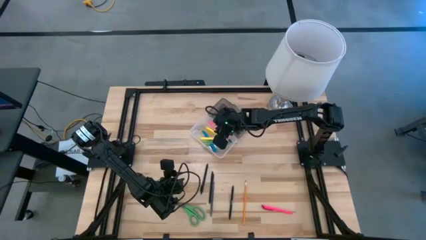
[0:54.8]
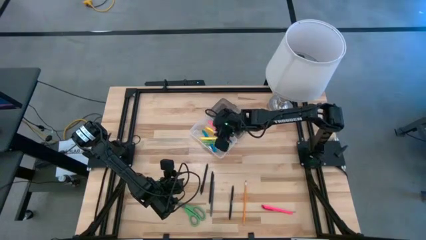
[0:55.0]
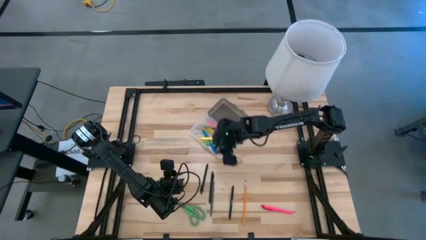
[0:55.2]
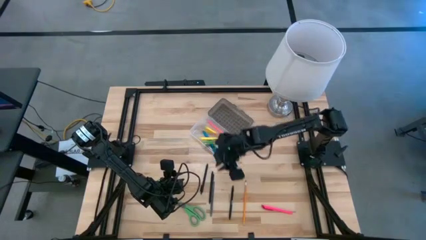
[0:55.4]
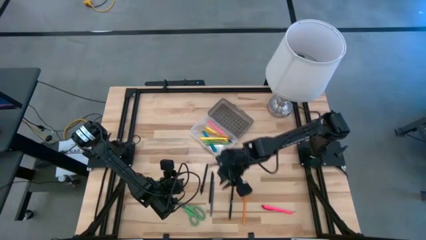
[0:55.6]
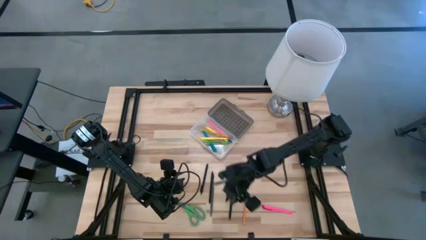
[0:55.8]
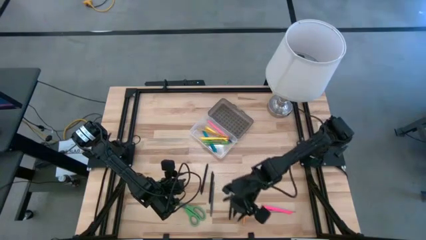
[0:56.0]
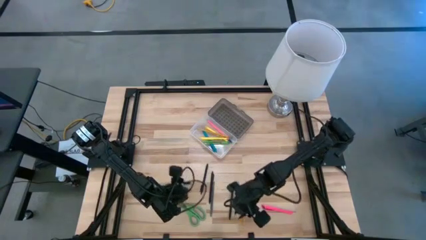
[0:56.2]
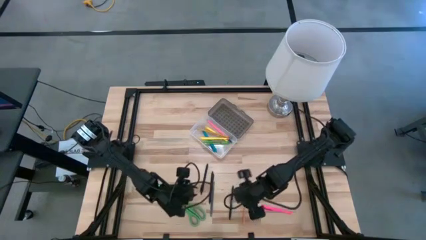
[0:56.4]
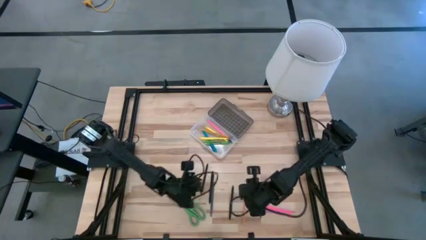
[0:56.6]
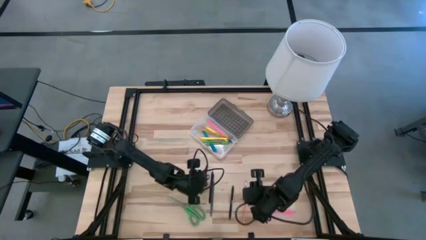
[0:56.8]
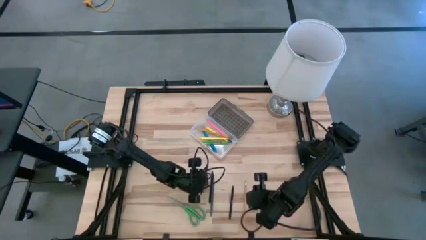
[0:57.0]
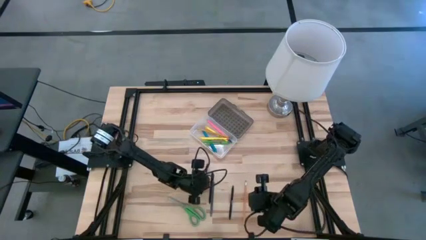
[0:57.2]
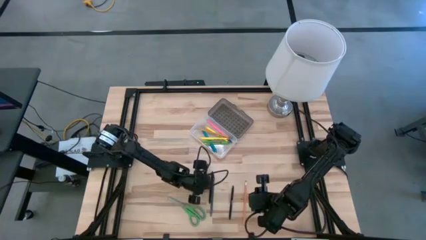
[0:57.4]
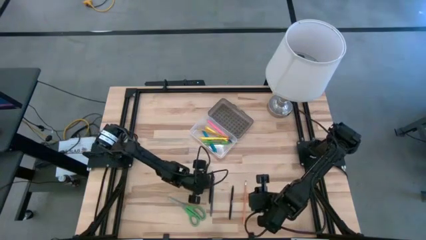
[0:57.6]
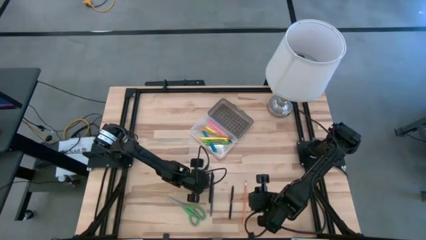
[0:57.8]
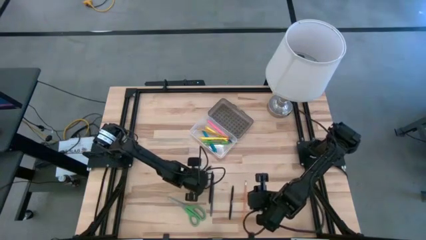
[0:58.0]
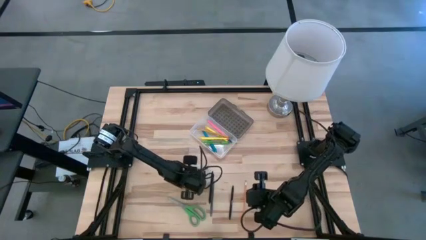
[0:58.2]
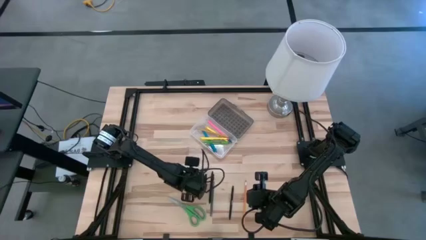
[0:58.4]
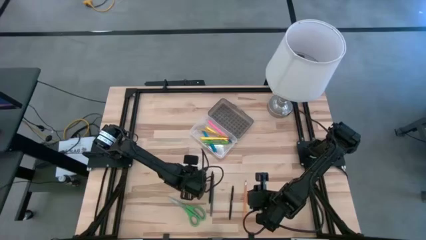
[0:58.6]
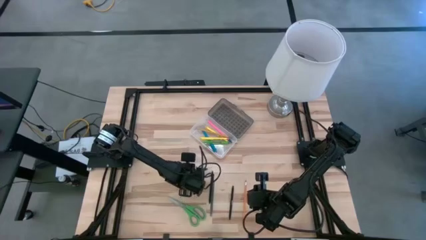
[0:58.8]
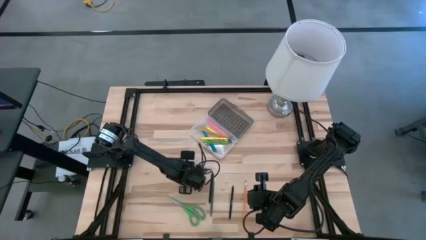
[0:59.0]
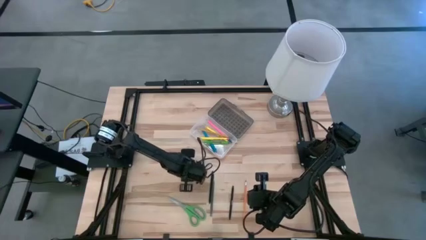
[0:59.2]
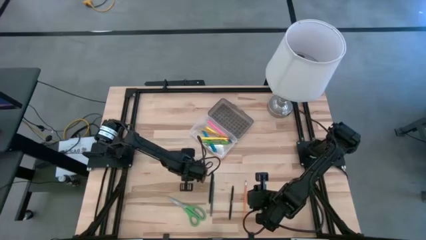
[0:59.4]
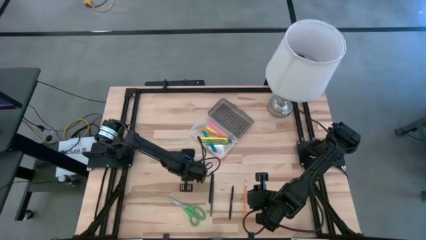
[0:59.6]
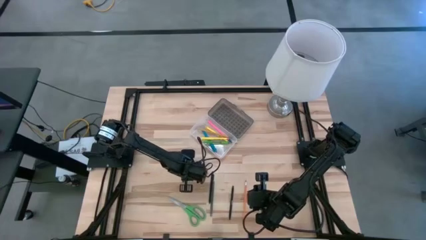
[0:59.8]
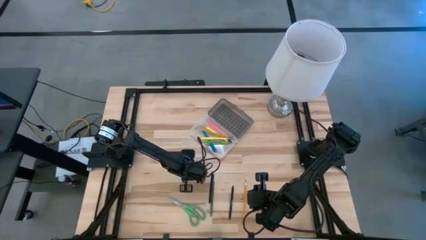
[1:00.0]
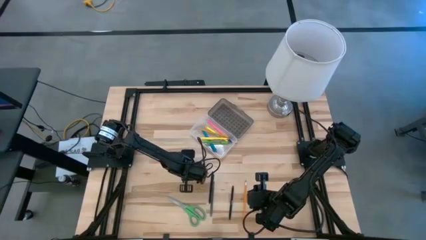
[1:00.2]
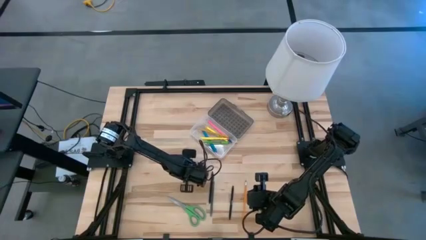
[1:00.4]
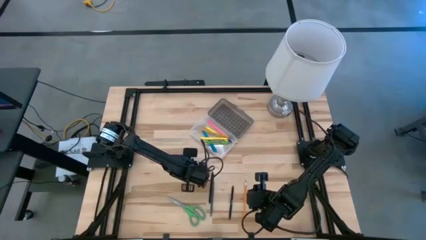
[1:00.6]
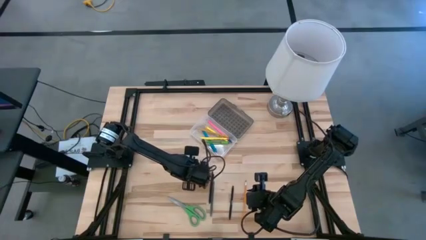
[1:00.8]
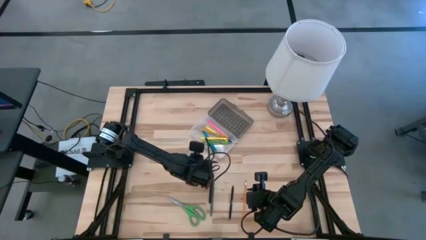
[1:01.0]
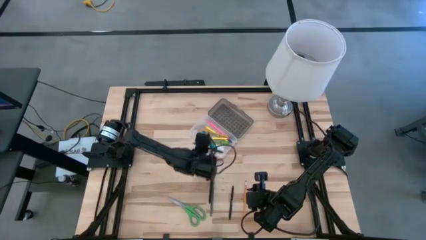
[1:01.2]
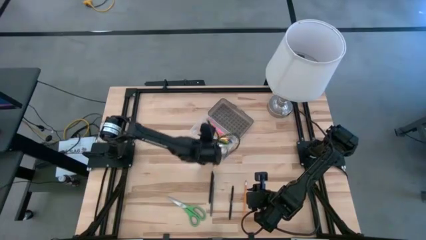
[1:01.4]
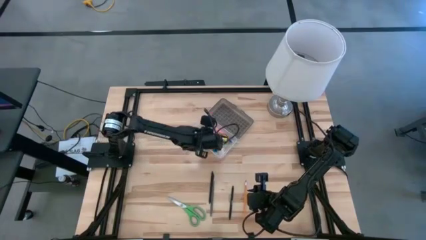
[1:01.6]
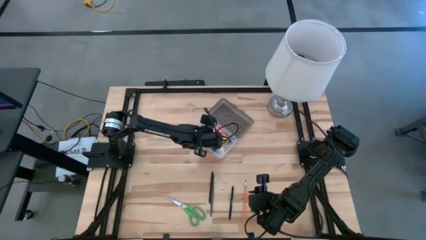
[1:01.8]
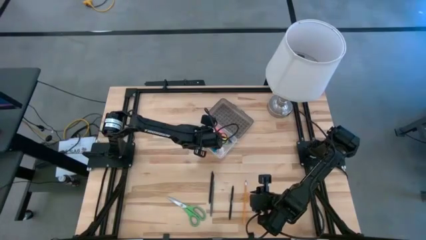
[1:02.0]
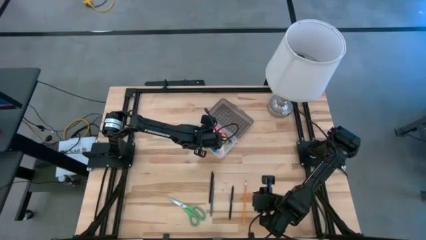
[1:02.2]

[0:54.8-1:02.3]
Task: Pick & place school supplies into a supply box
Put the top left black pen into the black supply box

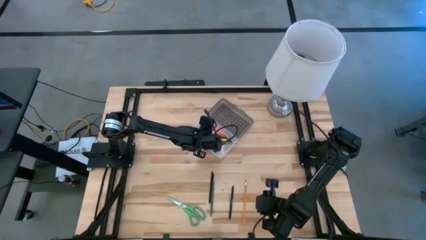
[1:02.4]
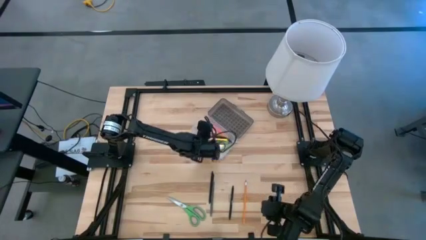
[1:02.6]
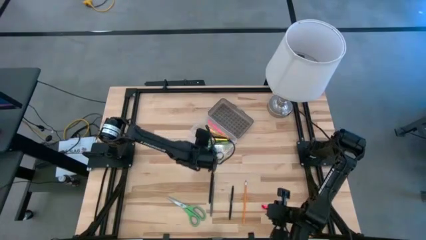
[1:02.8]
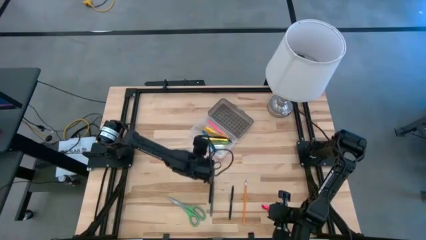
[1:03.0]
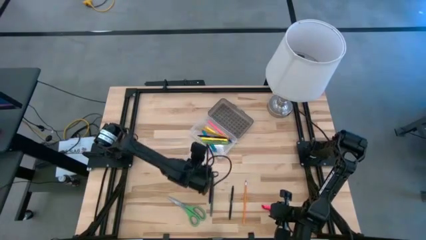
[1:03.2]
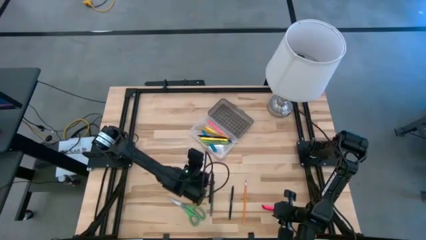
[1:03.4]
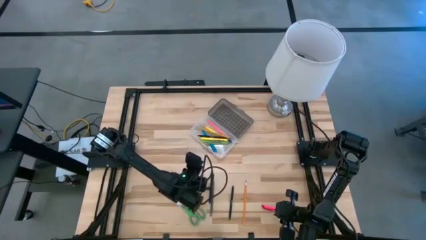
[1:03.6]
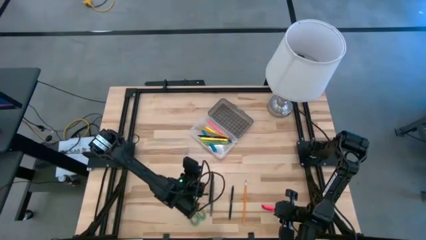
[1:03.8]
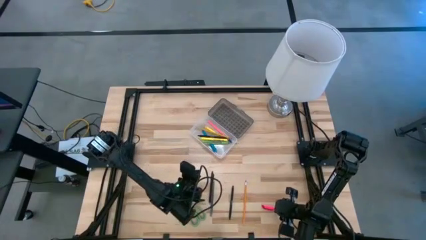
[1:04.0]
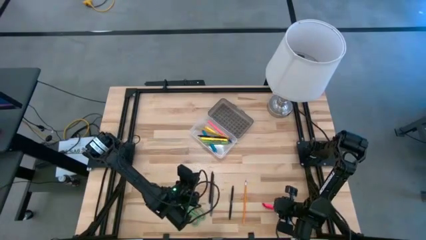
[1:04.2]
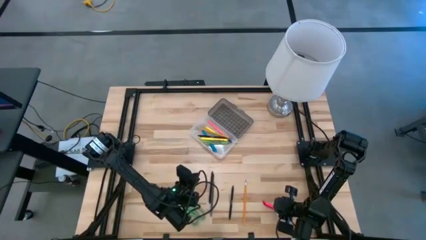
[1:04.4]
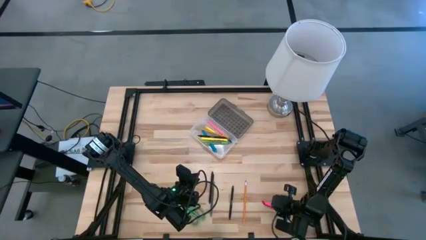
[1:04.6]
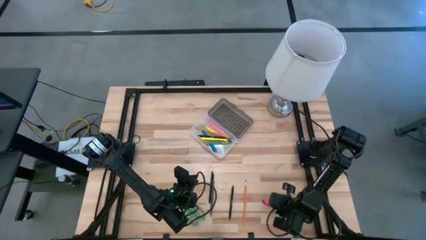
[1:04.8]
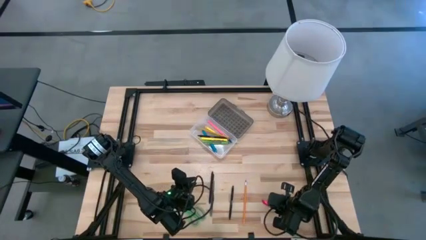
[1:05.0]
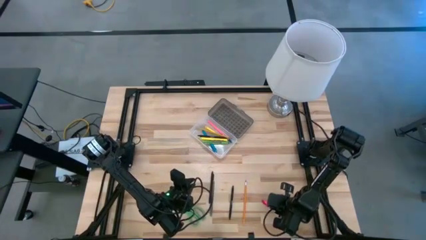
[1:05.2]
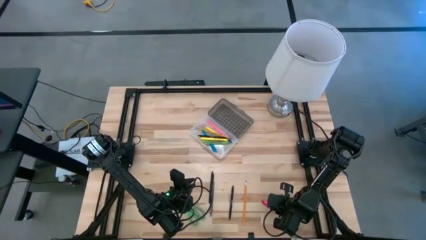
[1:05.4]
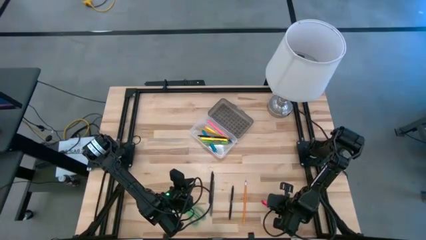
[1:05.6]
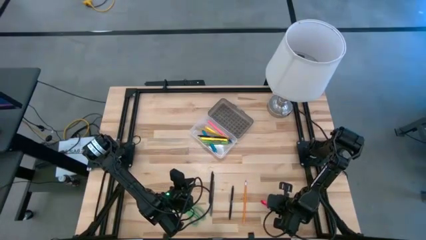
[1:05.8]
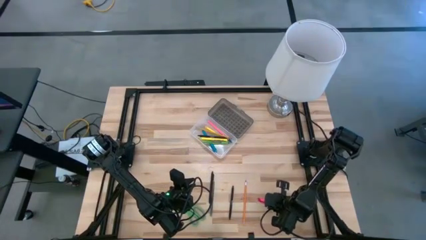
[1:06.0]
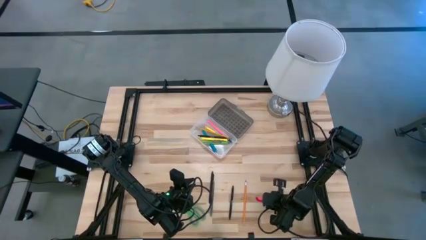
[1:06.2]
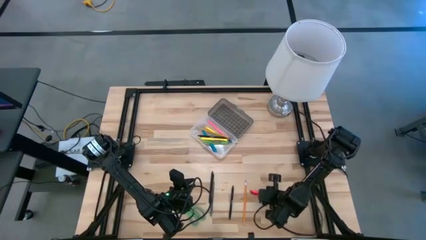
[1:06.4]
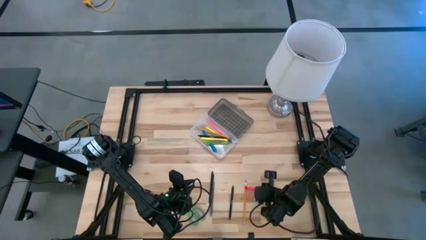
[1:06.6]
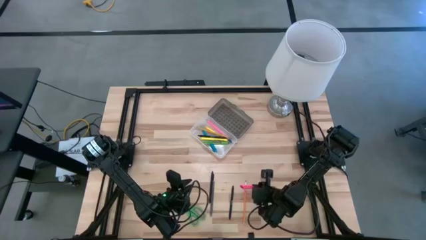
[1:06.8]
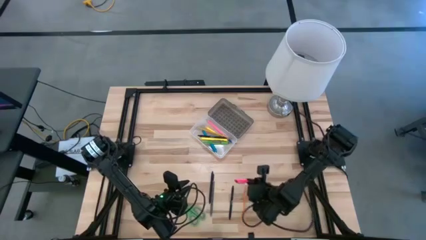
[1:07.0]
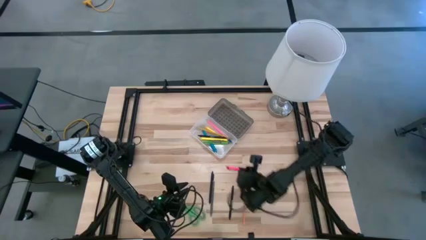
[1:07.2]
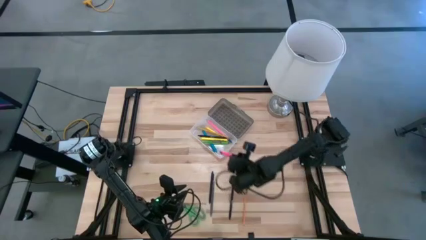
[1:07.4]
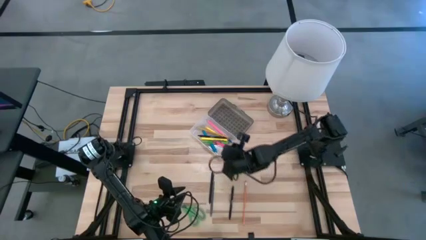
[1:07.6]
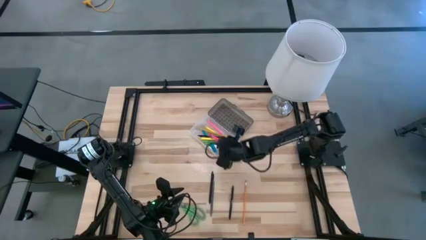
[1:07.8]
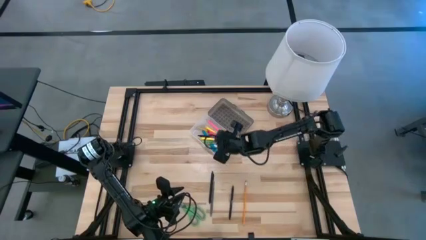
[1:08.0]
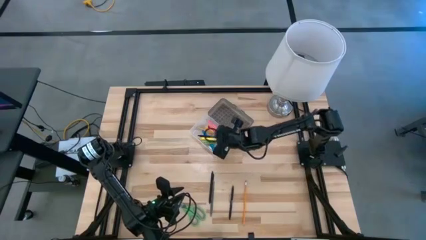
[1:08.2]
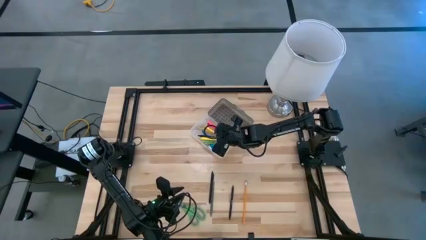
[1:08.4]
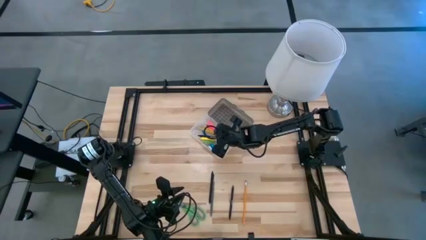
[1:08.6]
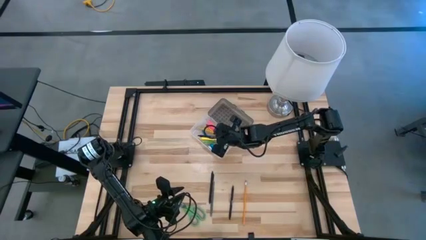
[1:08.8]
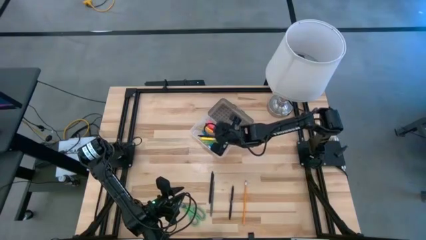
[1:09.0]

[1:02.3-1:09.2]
Put the pink pen into the black supply box

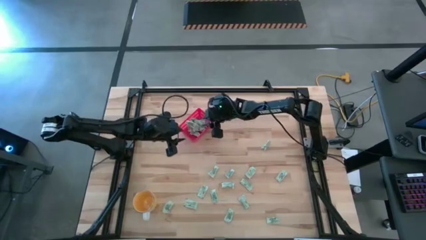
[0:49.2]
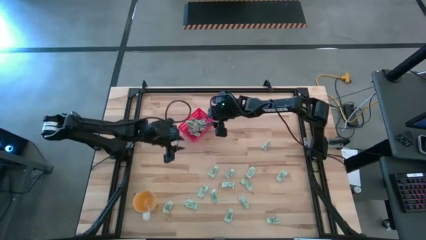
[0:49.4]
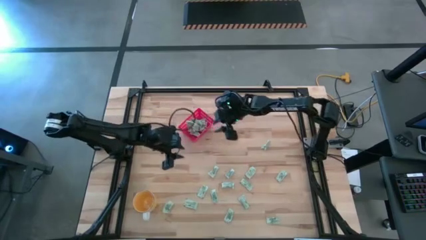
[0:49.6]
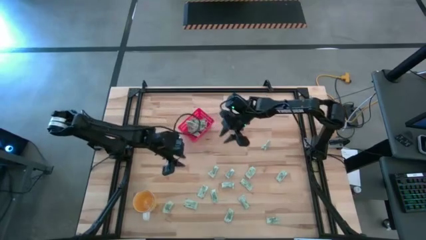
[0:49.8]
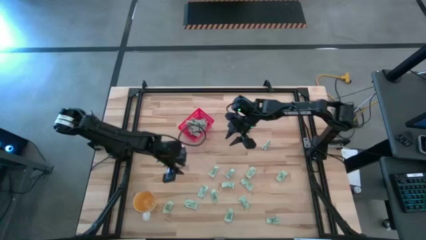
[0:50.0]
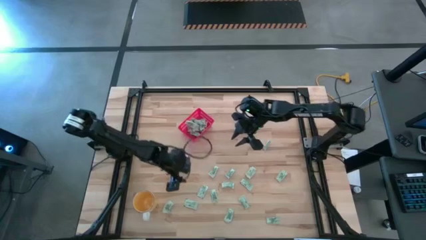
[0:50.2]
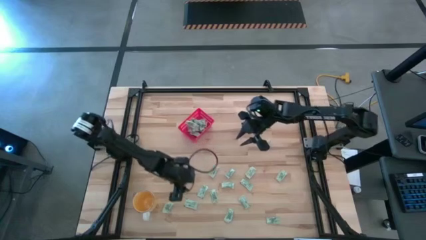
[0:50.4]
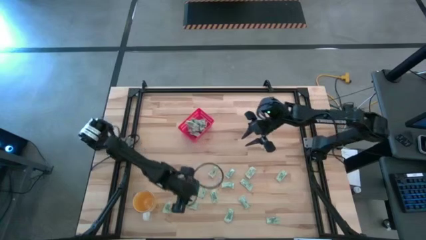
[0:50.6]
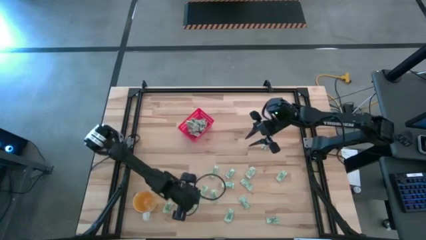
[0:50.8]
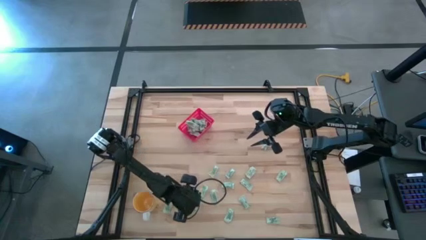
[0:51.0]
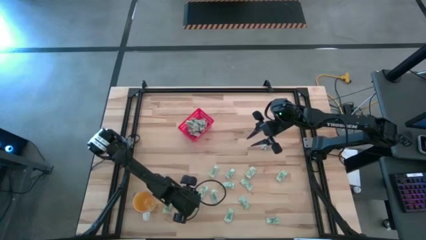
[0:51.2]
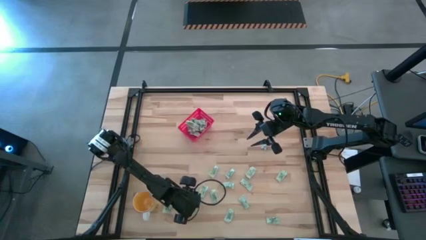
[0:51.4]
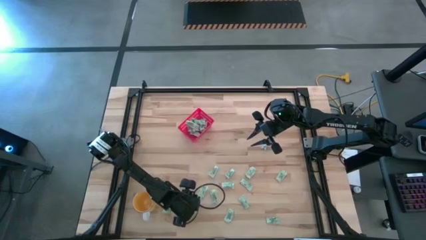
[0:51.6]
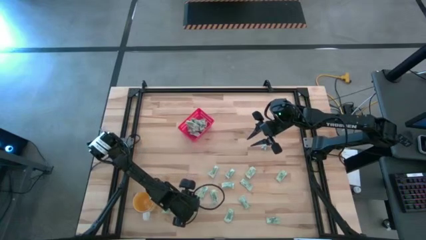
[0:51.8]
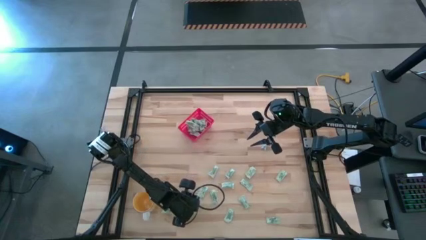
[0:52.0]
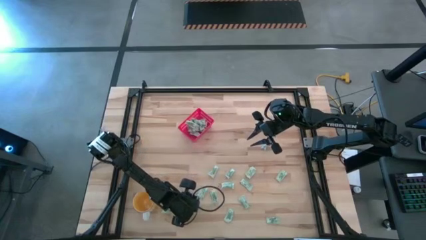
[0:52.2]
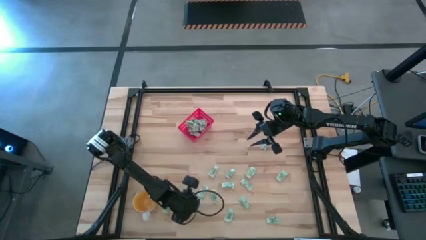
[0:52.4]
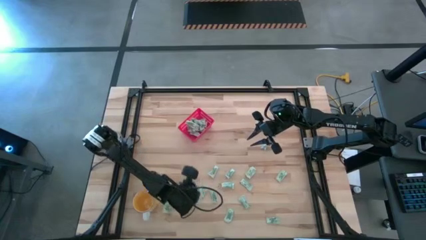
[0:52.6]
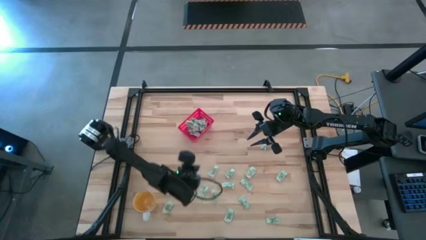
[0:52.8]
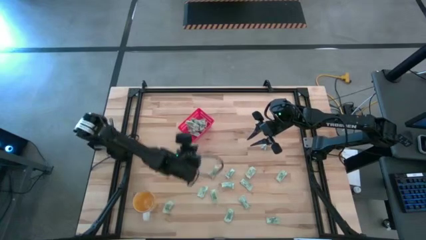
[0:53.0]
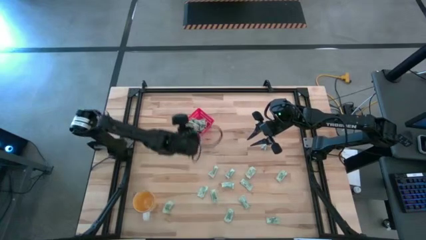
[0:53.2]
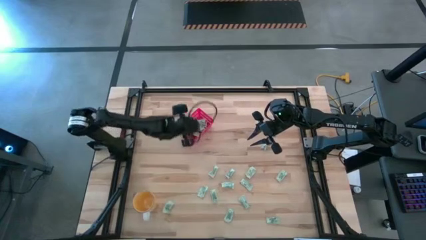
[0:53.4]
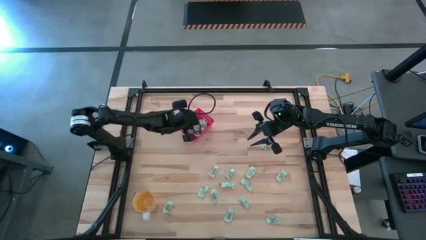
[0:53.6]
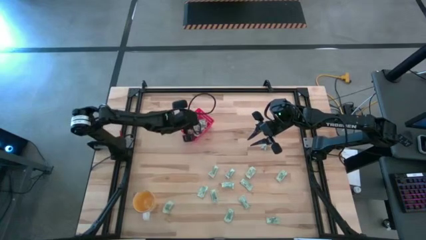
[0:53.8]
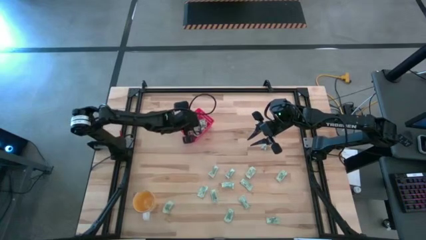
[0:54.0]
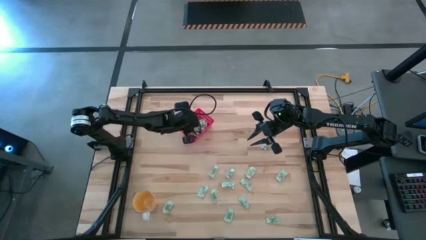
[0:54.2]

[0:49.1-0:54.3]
Task: Pick and place Stevia / Truvia into bins
Put the white stevia packet into the red bin
